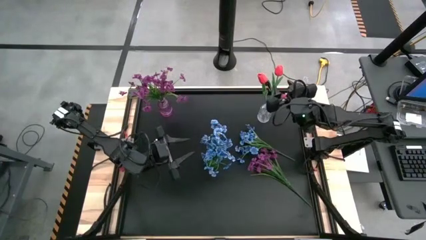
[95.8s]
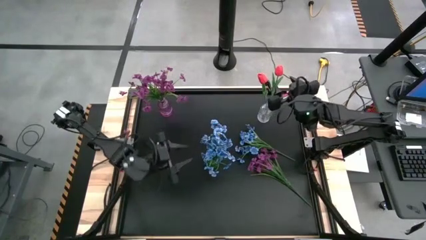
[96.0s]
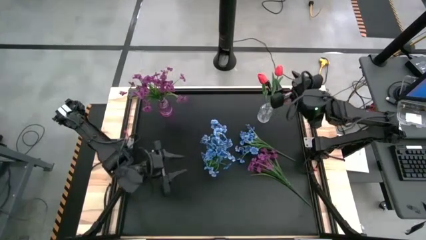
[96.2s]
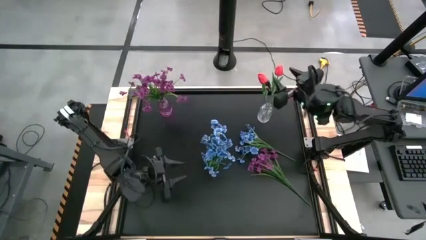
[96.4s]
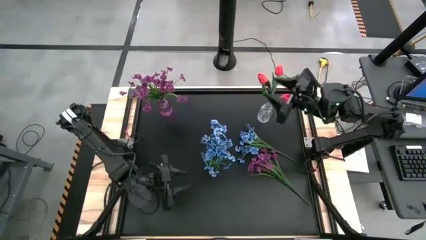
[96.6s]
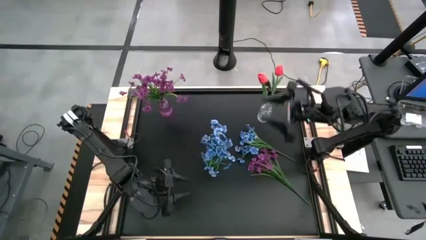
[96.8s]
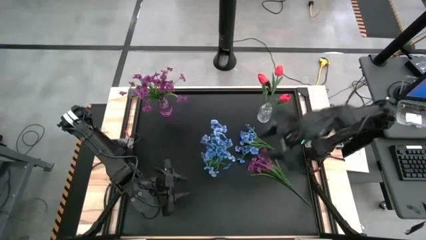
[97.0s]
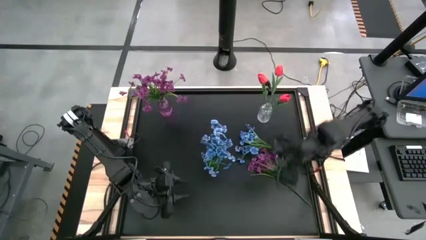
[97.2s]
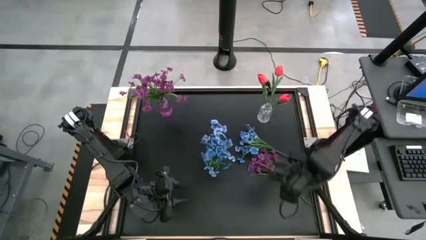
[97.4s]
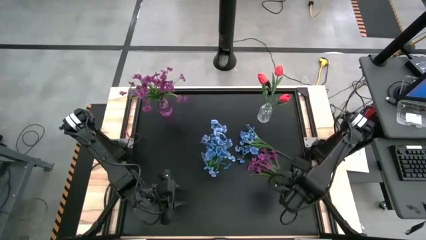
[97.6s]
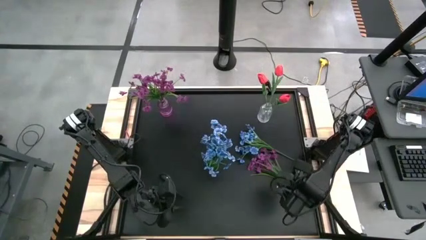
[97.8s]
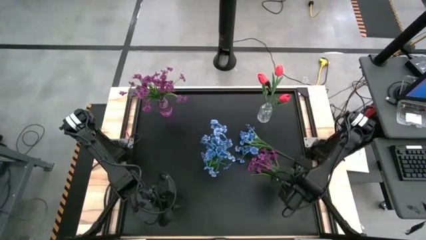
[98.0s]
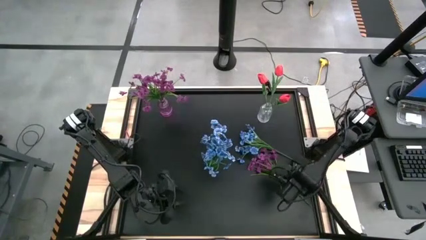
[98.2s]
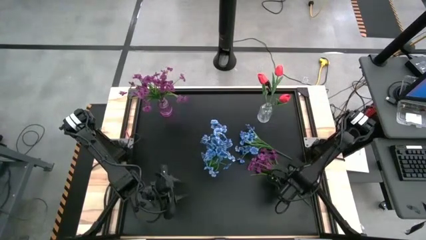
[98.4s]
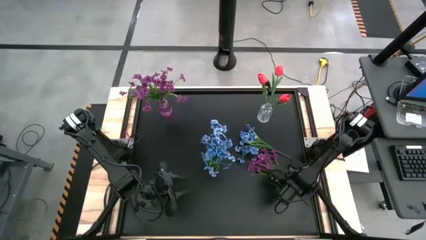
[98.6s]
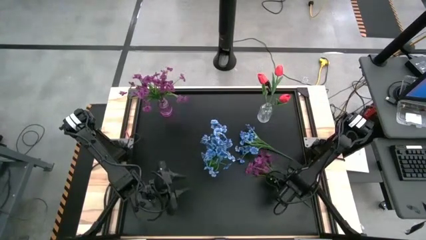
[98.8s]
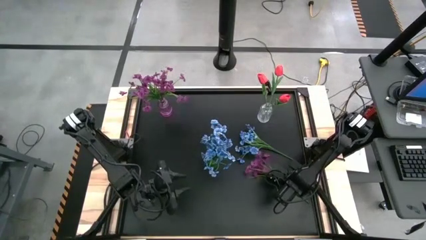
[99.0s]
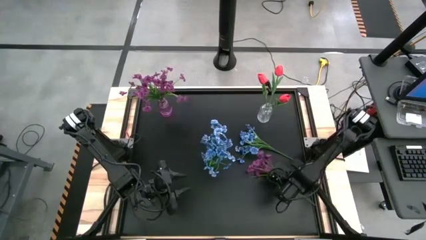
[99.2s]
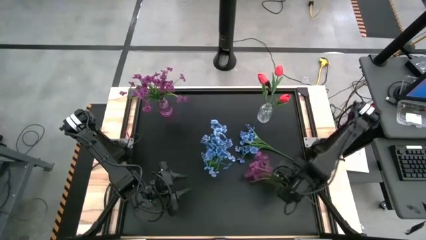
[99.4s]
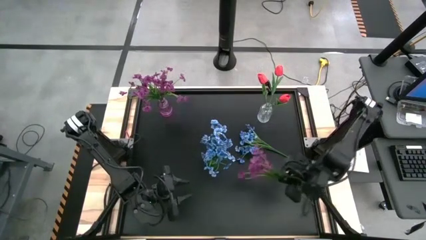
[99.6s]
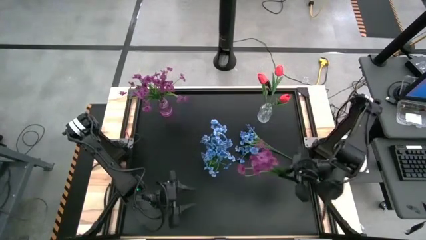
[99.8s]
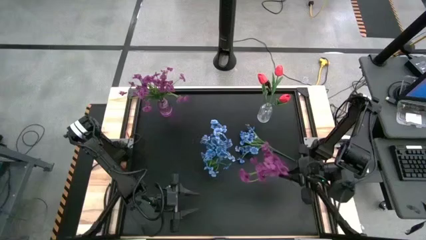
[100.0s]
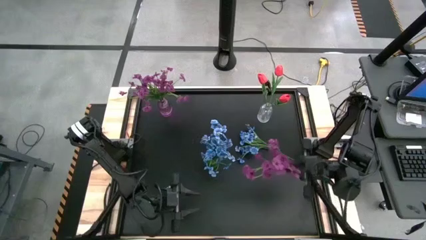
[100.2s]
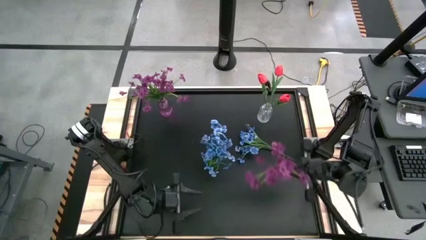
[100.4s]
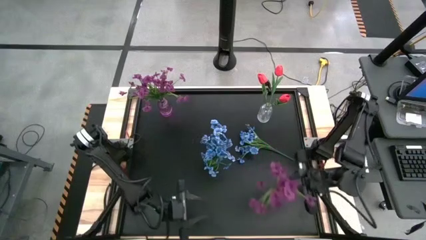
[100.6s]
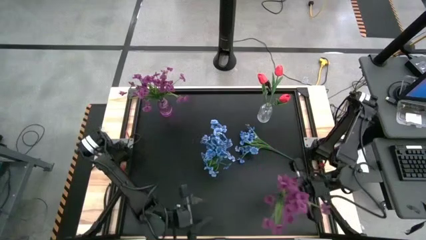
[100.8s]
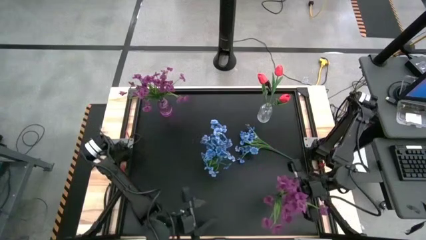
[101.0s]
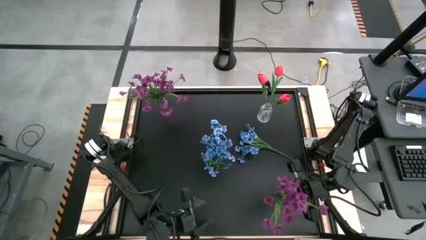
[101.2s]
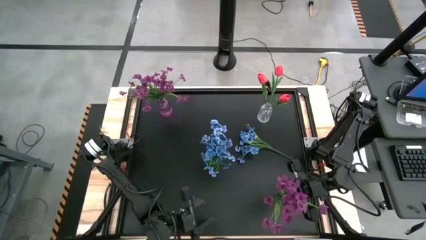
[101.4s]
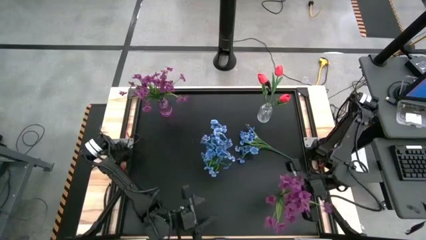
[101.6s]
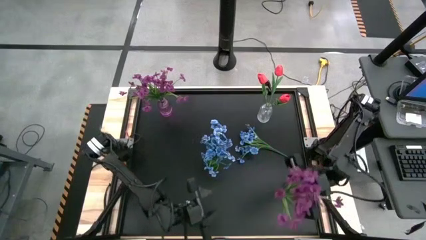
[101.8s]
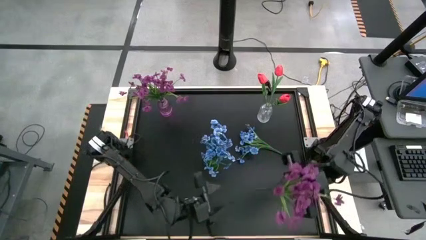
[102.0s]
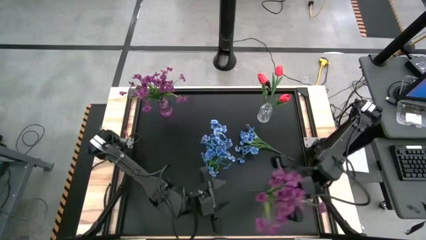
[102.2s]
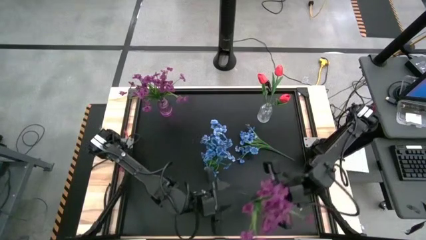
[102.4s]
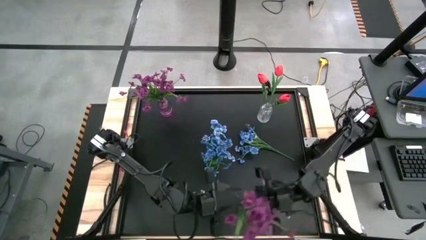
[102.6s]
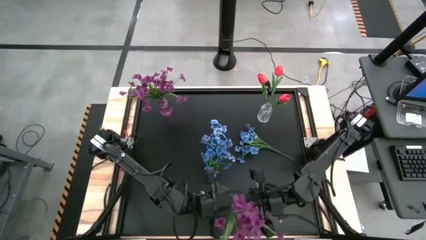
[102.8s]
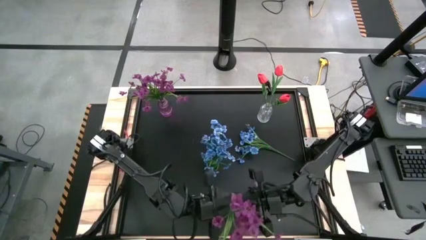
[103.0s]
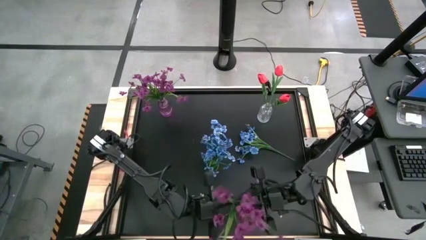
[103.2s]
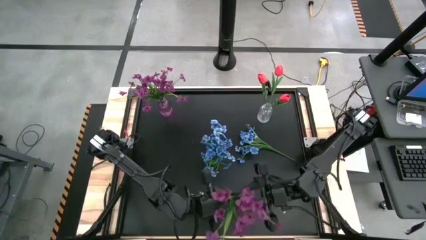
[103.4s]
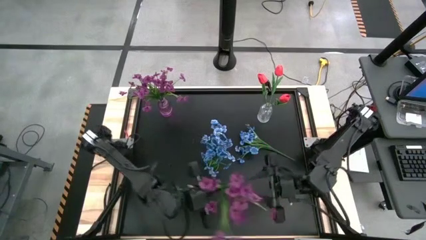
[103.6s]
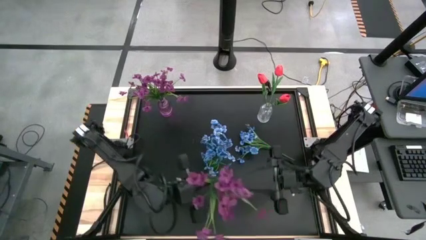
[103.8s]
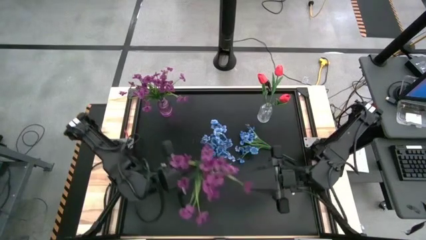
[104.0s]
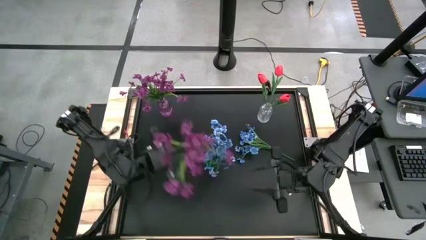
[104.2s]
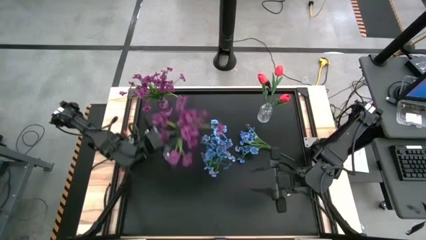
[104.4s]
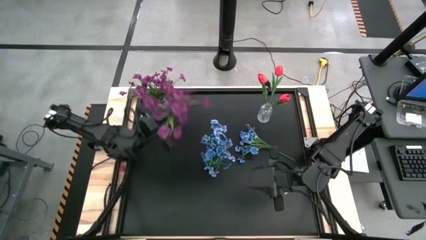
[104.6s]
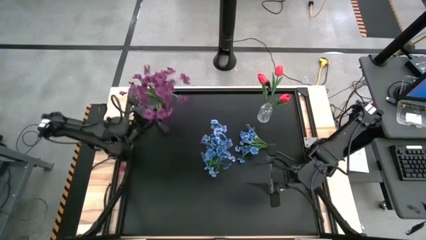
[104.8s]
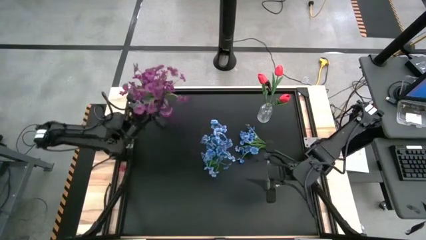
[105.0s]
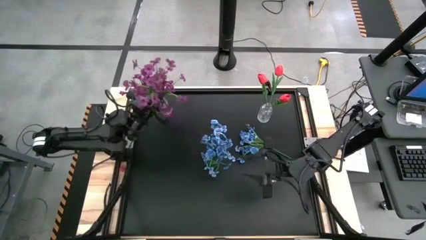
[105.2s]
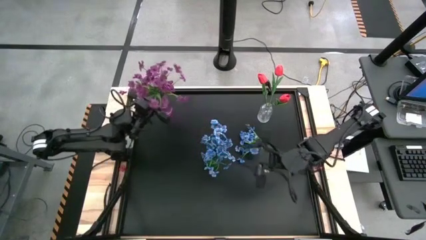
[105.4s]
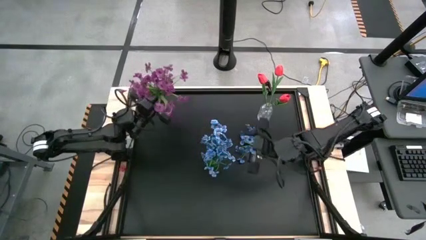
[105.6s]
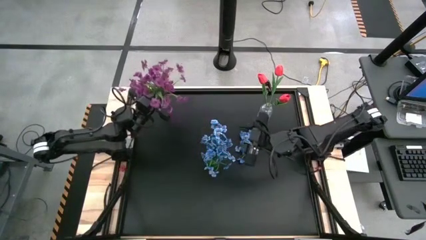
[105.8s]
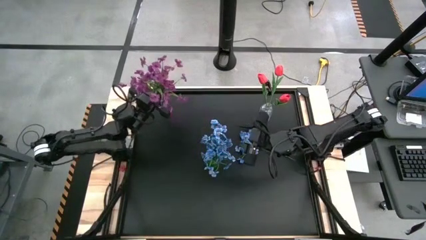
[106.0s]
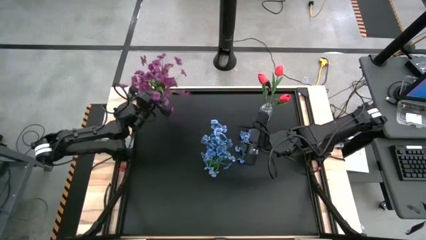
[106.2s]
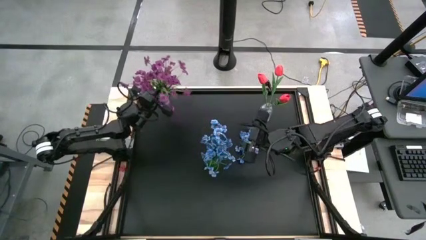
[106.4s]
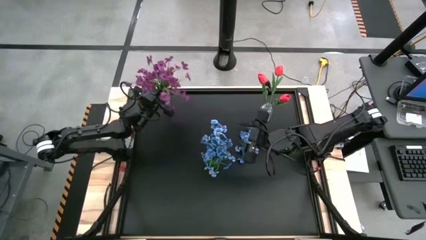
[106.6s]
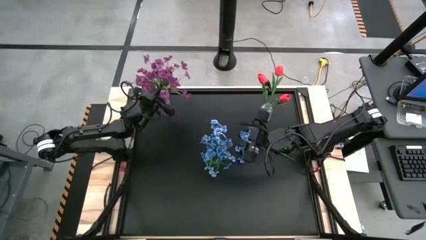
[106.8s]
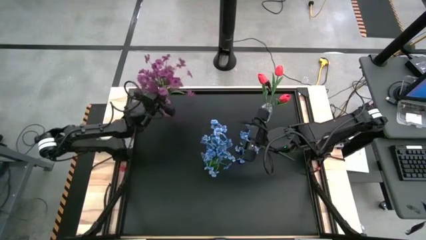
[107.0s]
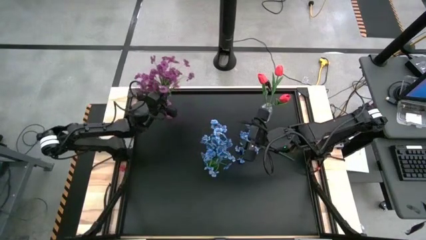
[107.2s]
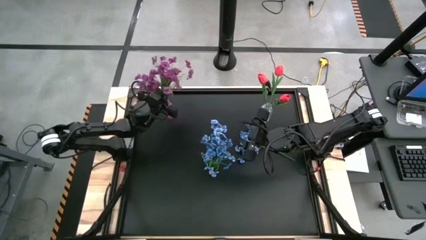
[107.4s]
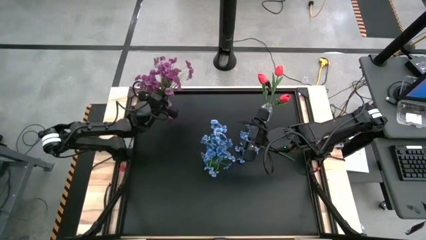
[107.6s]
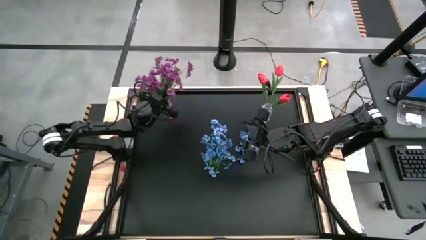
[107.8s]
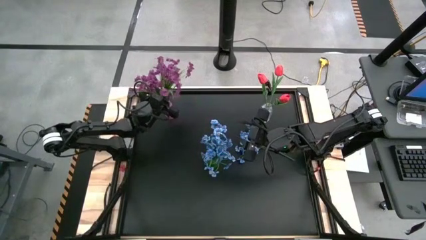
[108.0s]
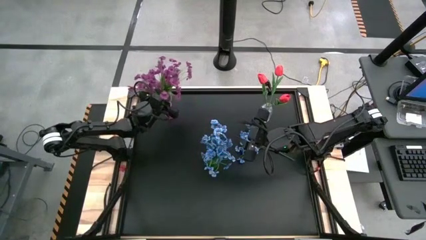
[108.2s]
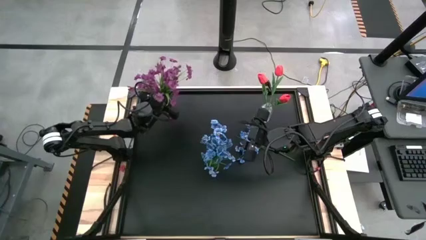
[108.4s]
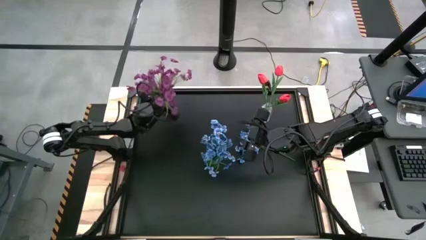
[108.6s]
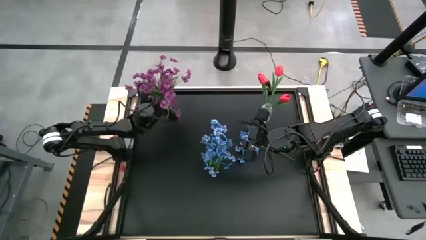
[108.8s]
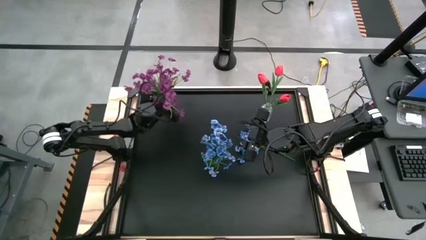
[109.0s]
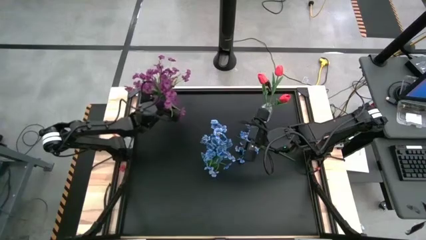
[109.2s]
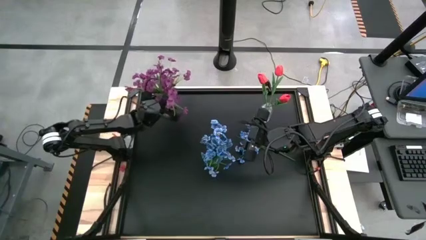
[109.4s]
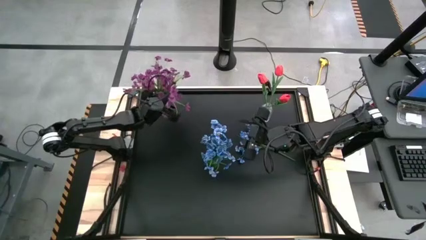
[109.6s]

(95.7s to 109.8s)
Task: Sort flowers into vase by color
Put the purple flower into the purple crystal vase

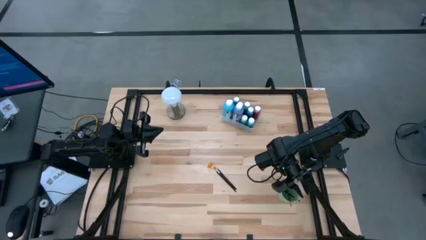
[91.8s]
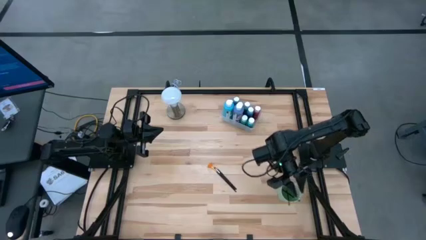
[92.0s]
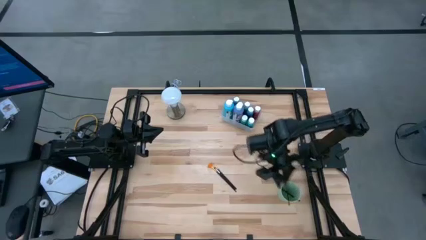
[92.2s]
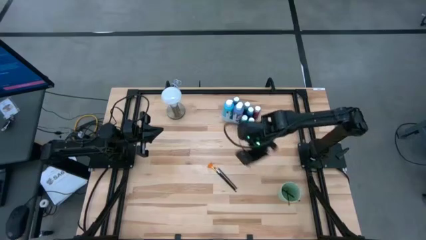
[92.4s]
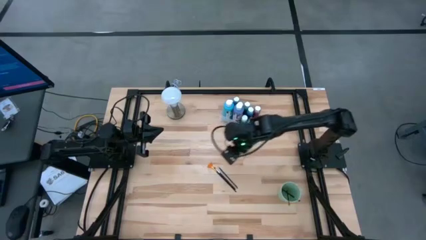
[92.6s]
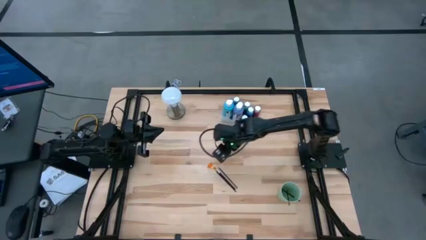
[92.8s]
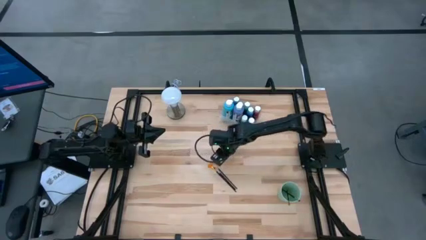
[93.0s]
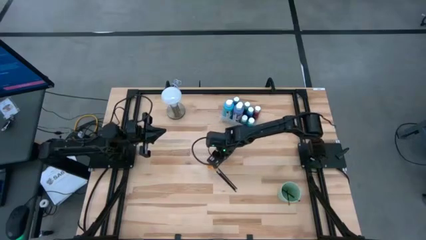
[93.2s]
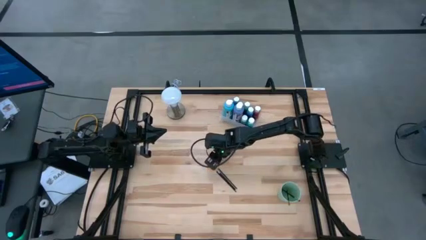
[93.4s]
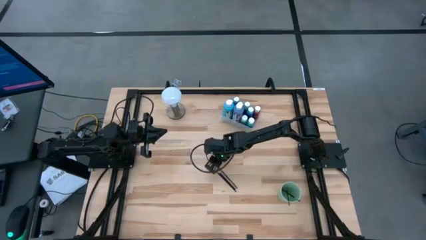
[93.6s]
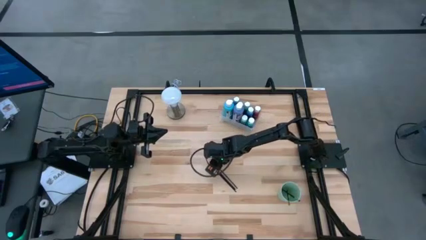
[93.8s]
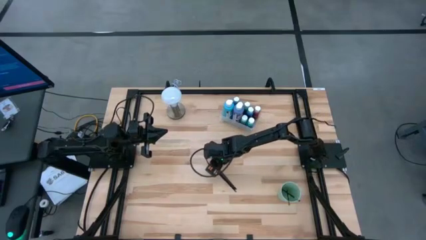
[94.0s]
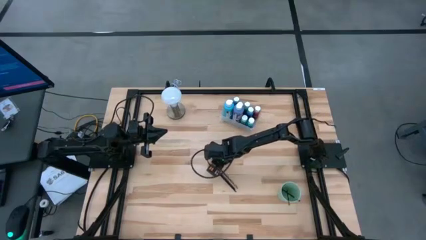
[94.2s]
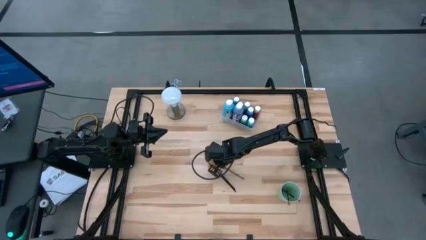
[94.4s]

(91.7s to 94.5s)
Task: Pick & Place Paint Supplies
Put the black paint brush into the green cup
